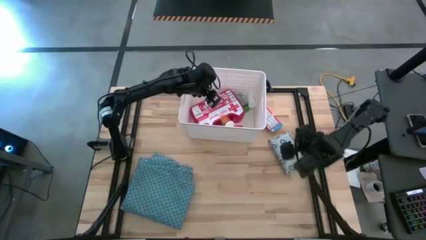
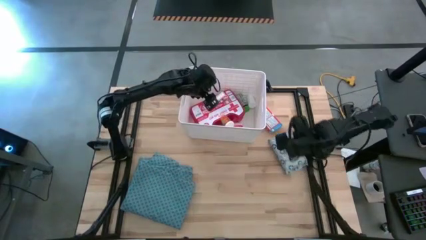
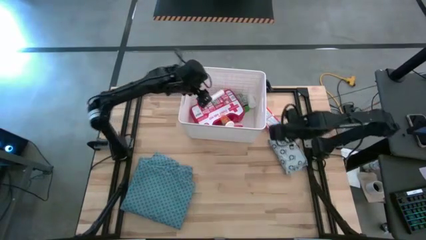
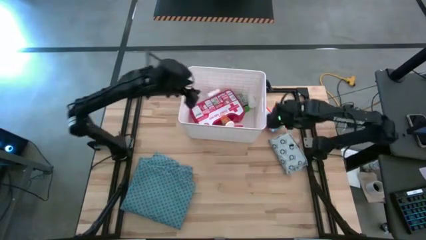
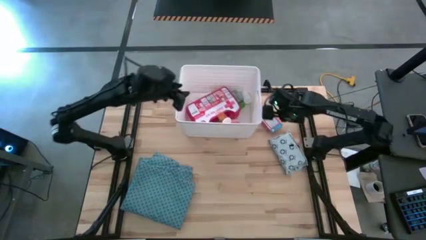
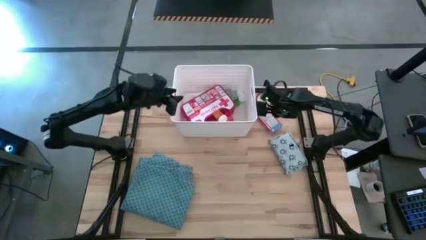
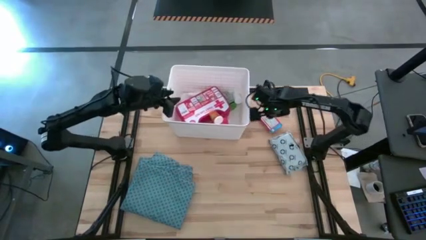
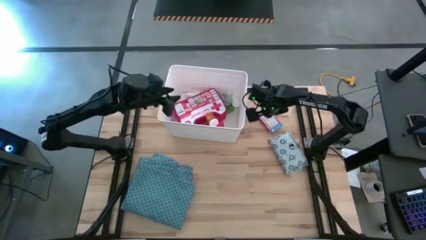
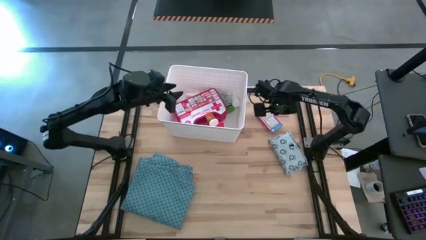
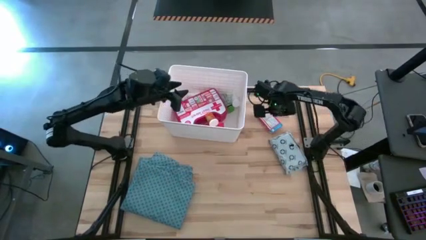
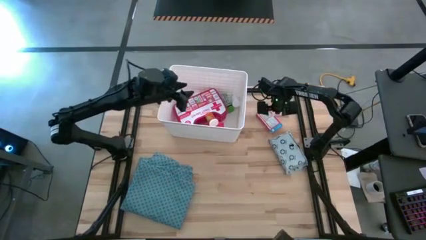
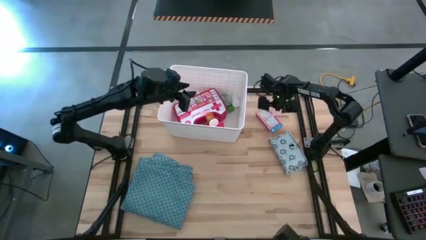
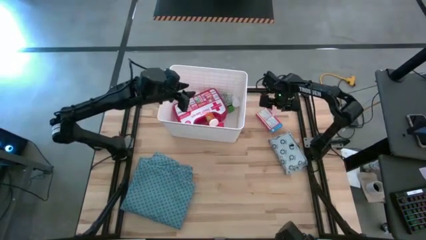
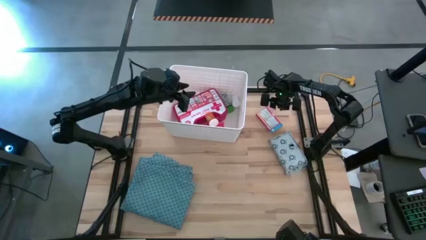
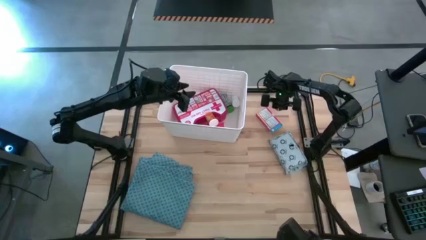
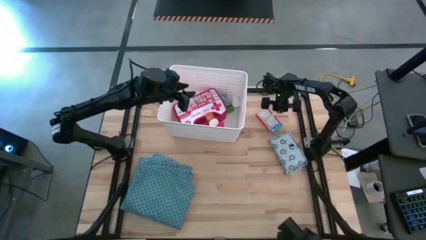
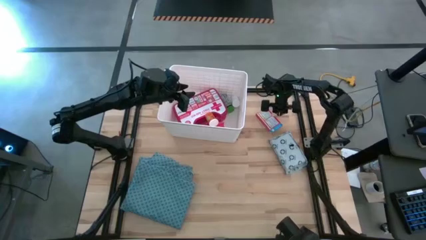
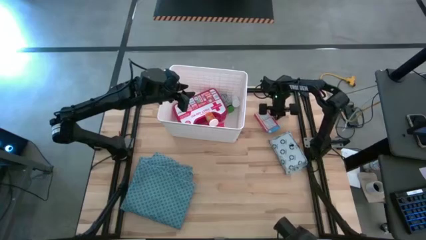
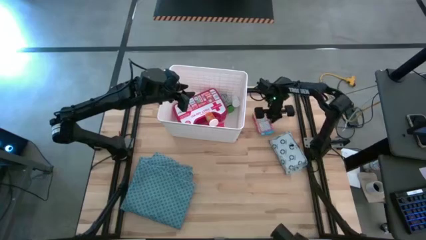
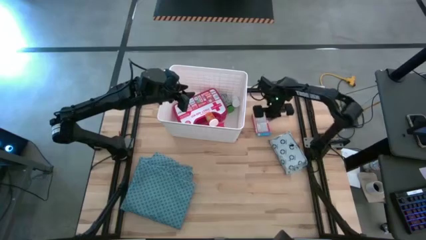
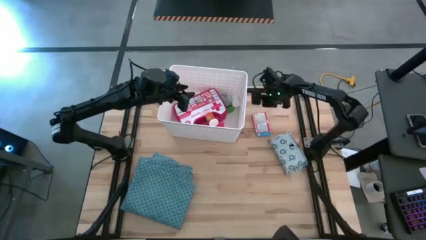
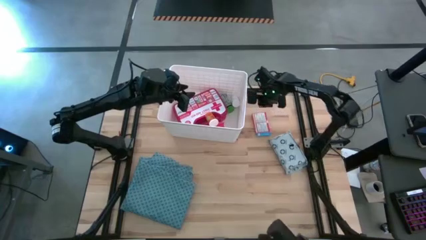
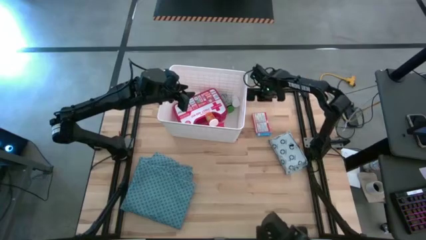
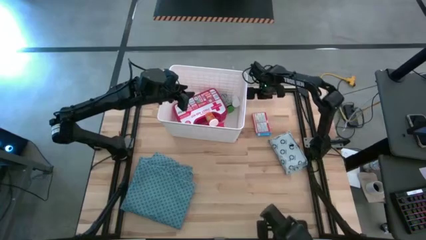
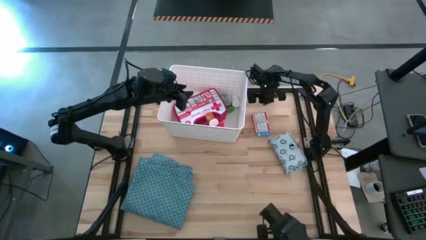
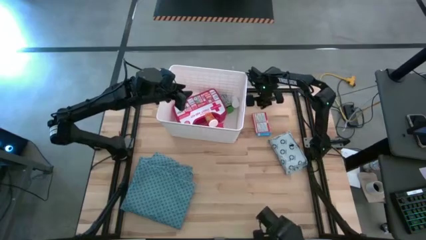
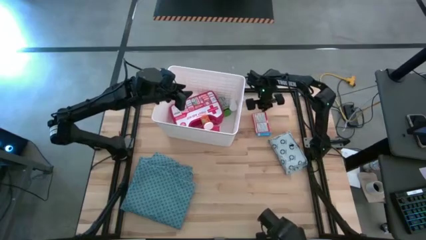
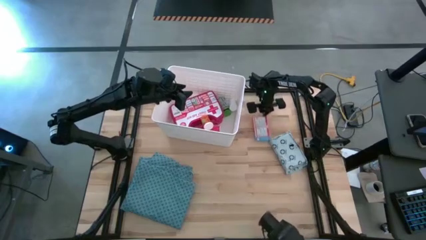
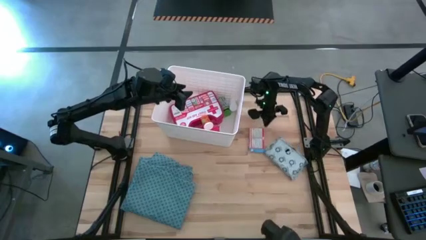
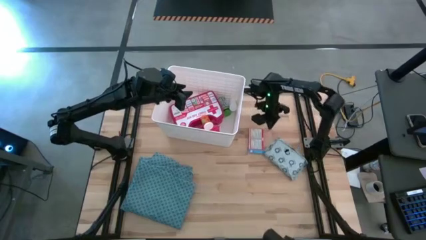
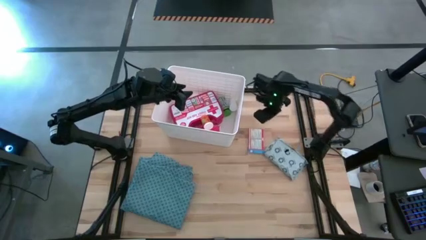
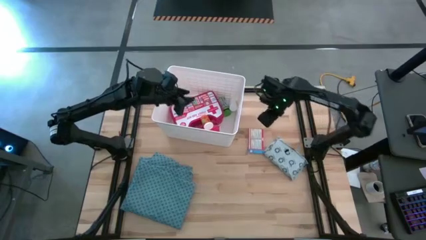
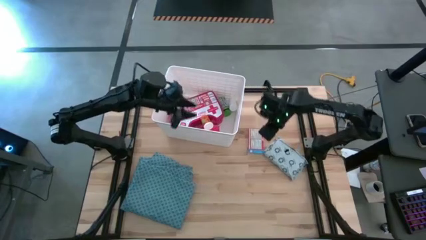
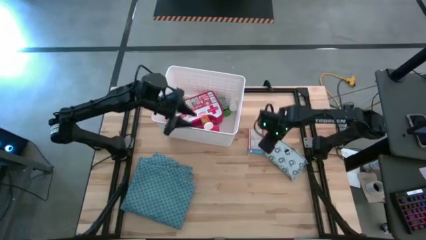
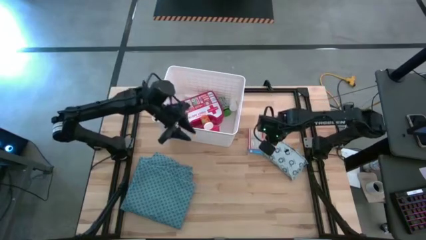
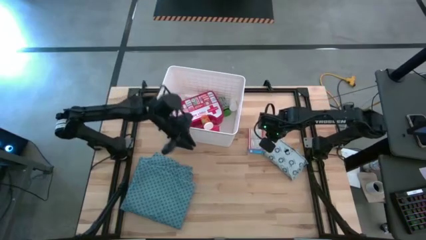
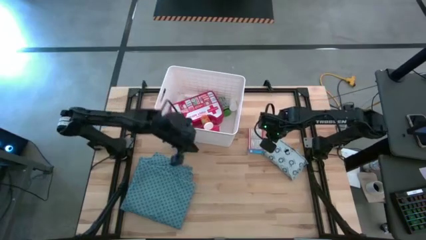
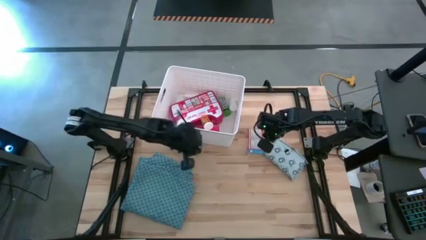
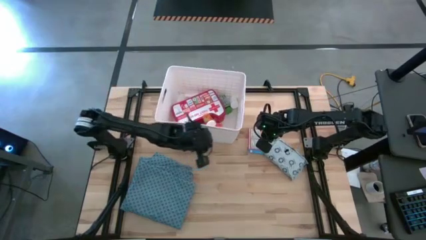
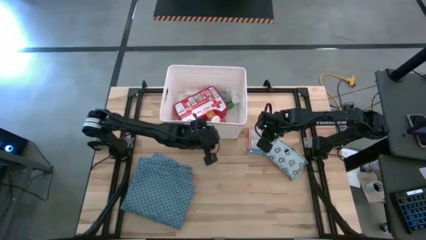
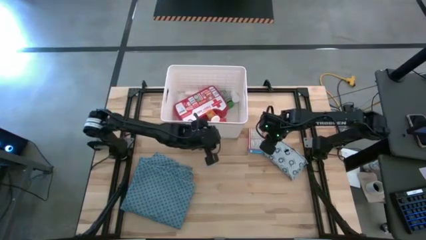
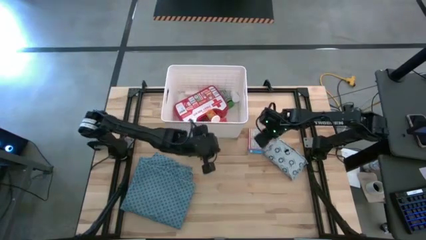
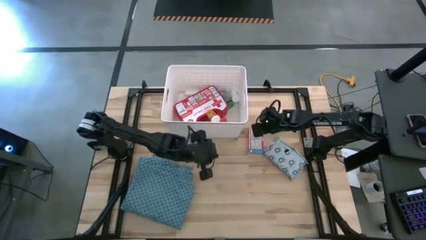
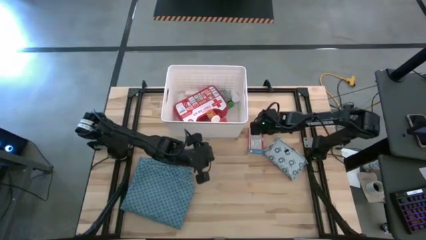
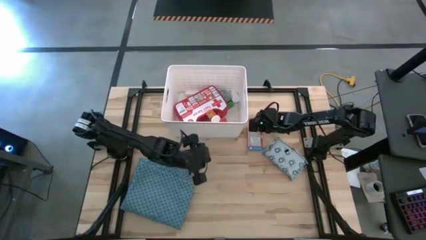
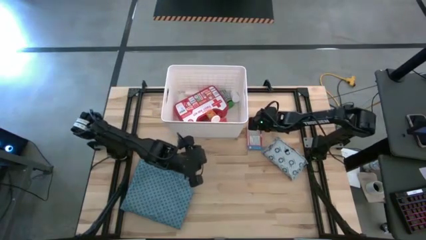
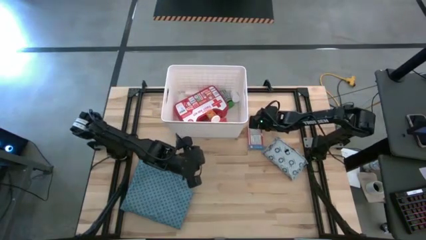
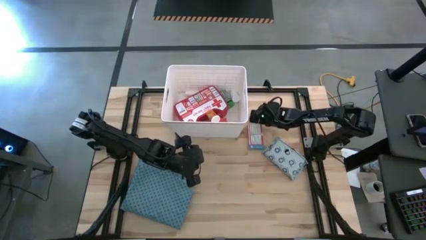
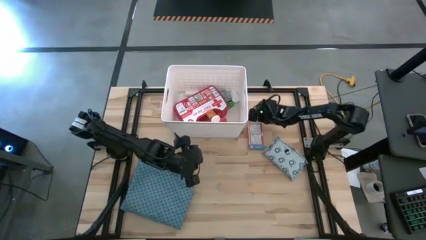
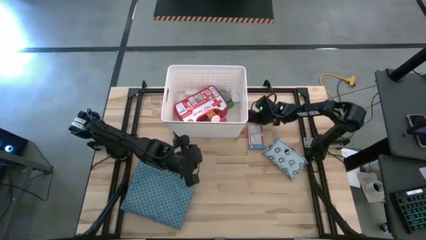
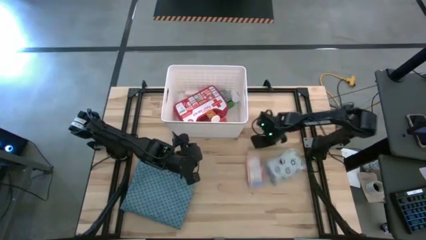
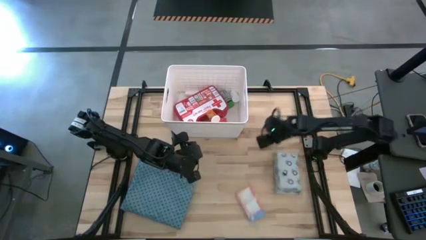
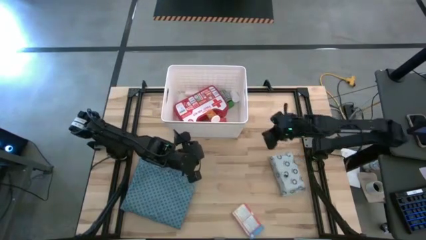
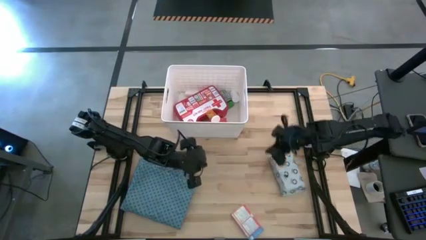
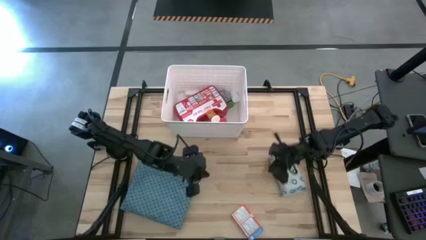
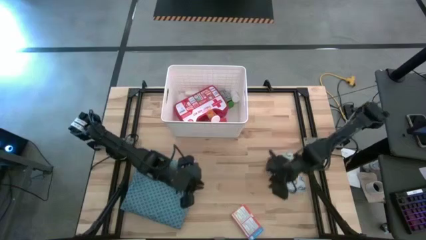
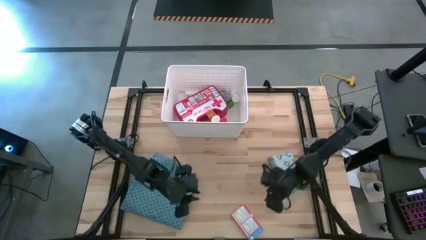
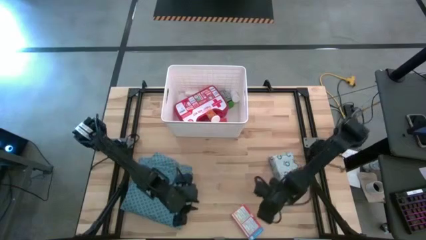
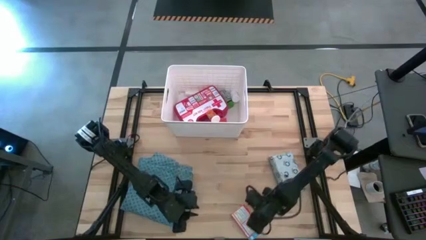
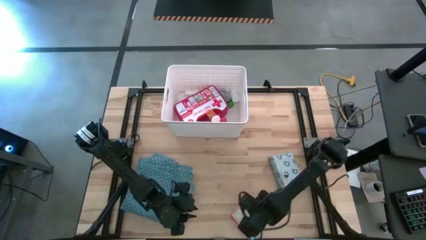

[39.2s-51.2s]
Task: Pick & place medical supplies in basket/bin
Put the red medicine box into the white bin

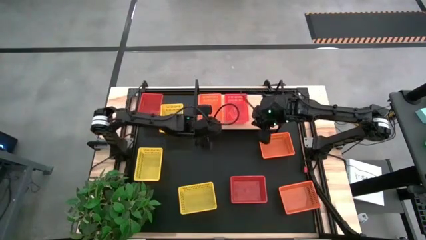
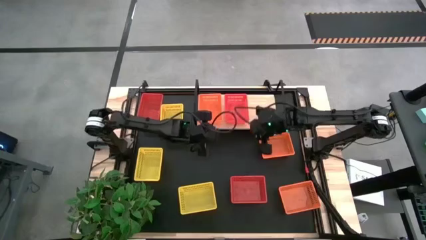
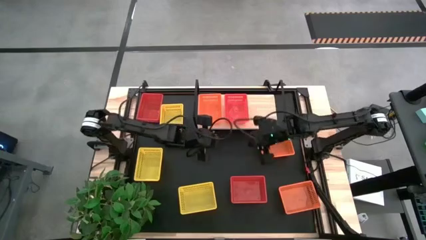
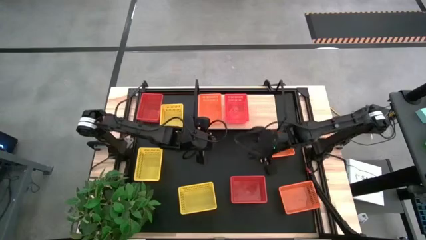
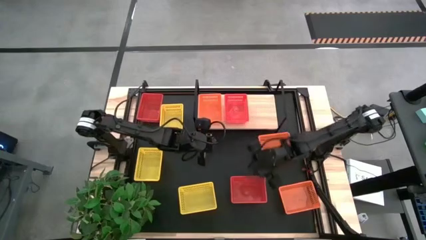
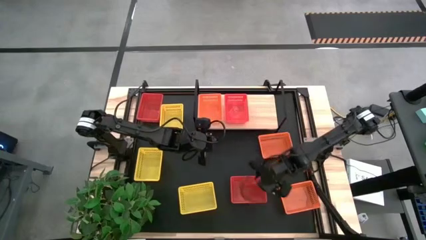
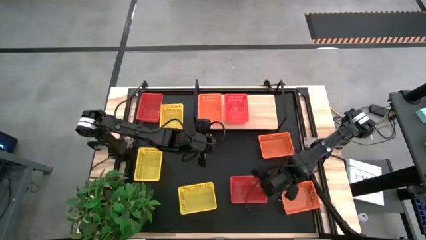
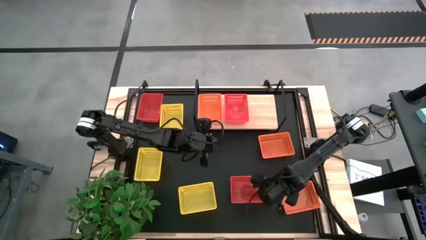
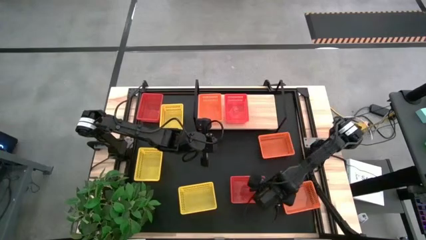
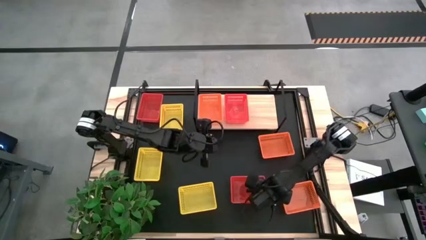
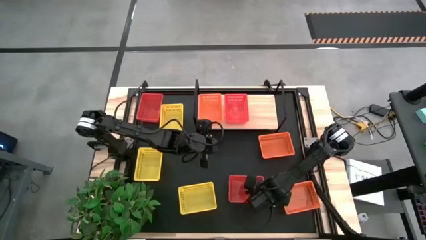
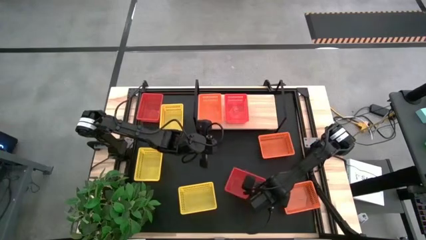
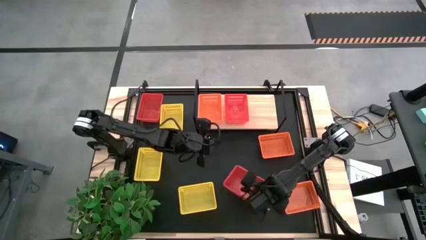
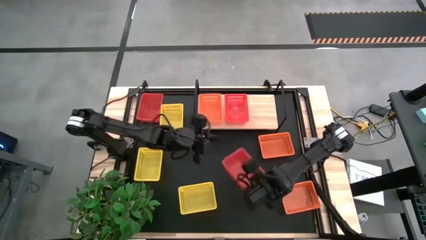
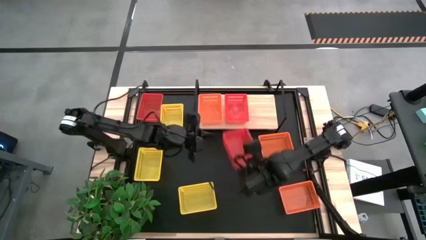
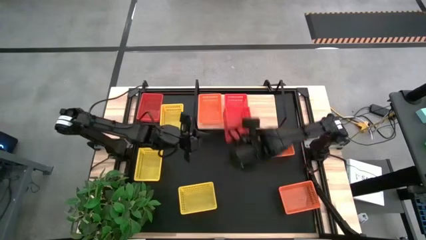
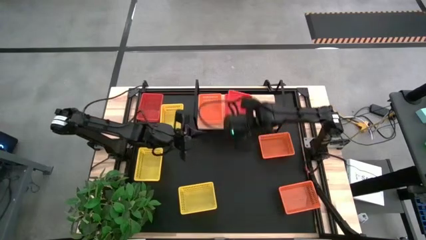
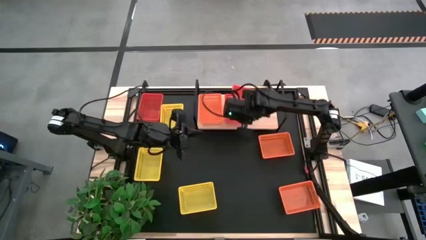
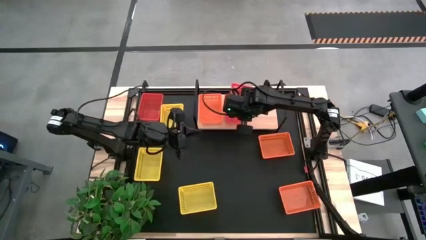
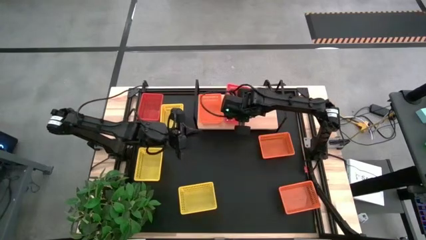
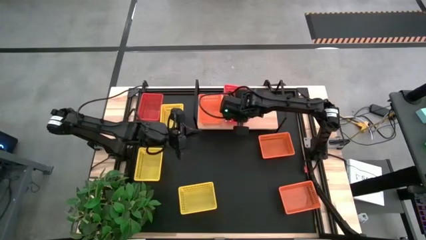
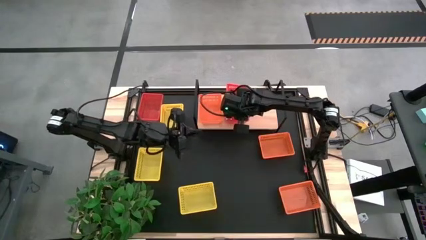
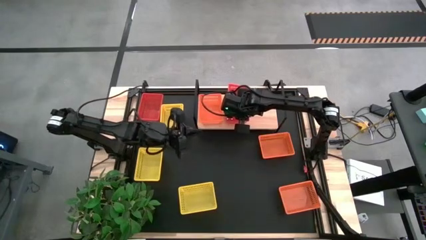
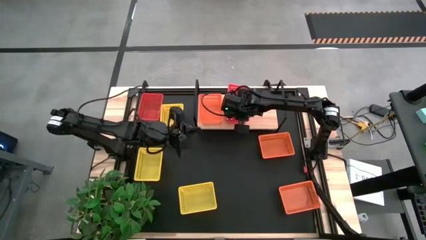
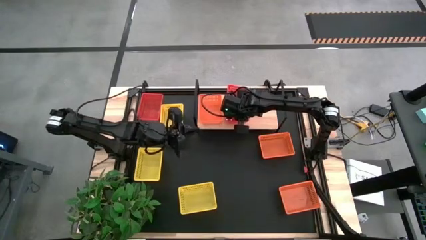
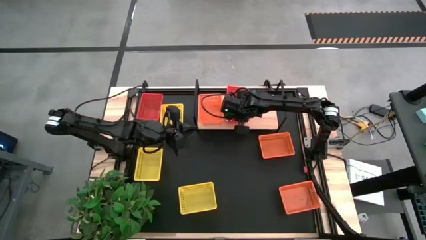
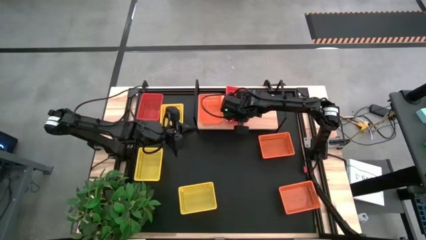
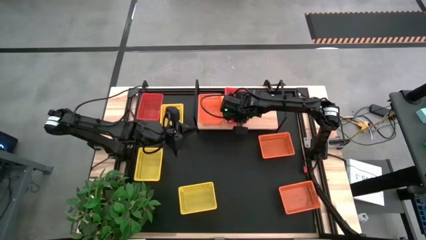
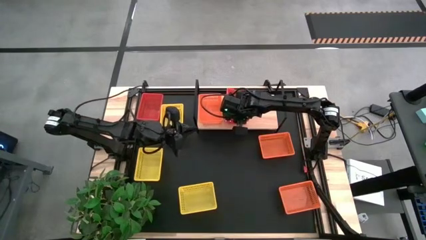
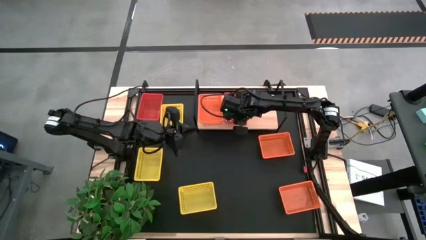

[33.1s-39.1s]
Task: Stack baskets on shelf by color
Stack the bottom red basket on top of the red basket on the shelf
